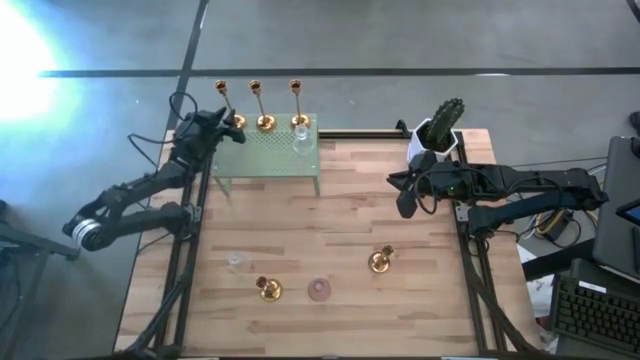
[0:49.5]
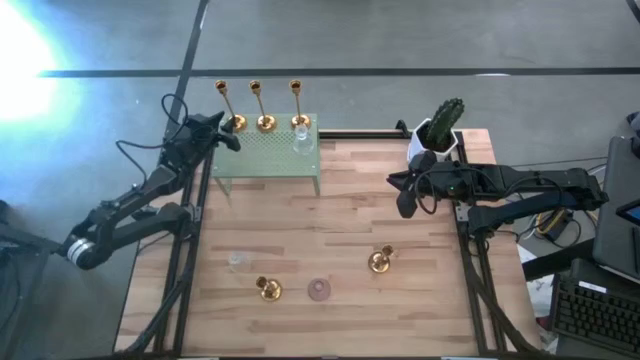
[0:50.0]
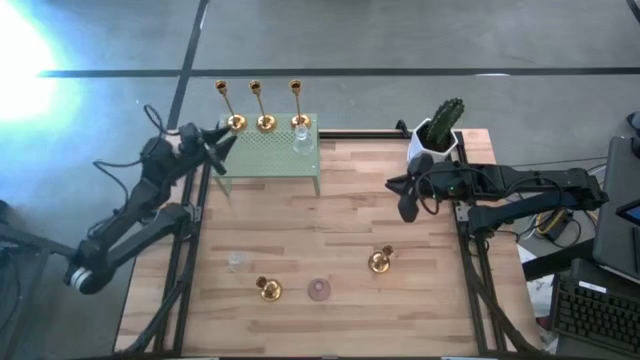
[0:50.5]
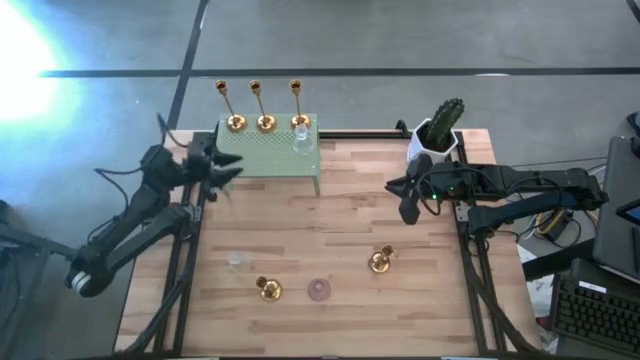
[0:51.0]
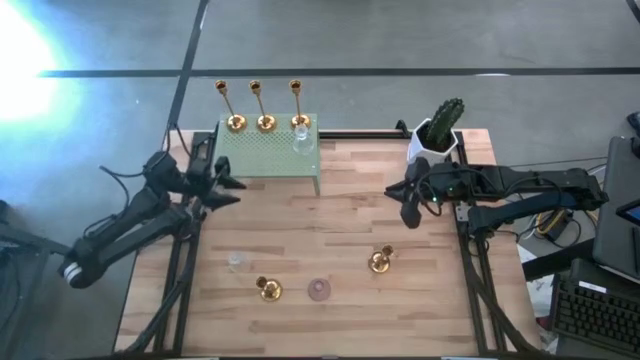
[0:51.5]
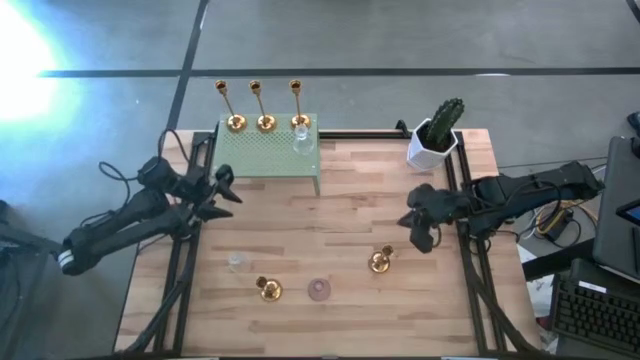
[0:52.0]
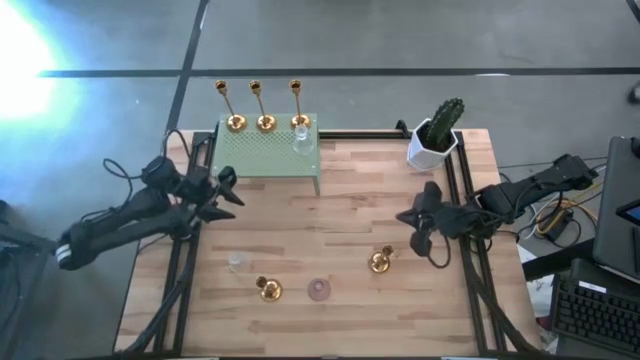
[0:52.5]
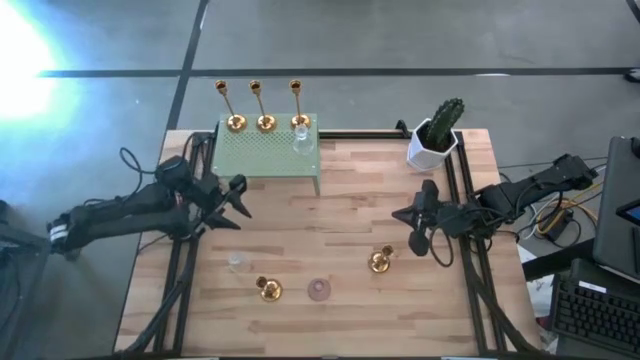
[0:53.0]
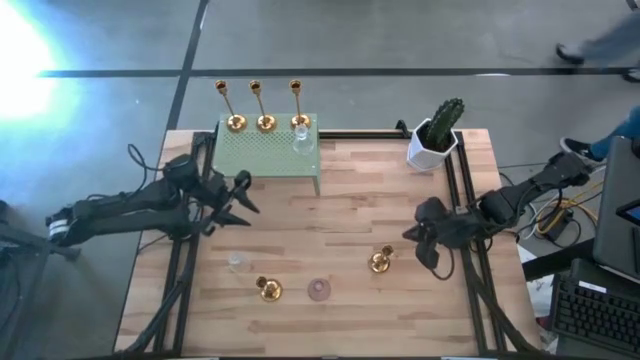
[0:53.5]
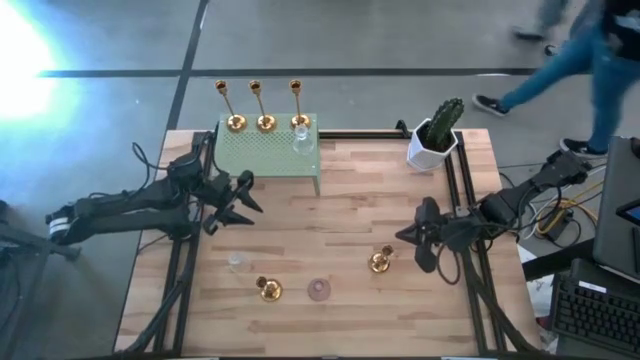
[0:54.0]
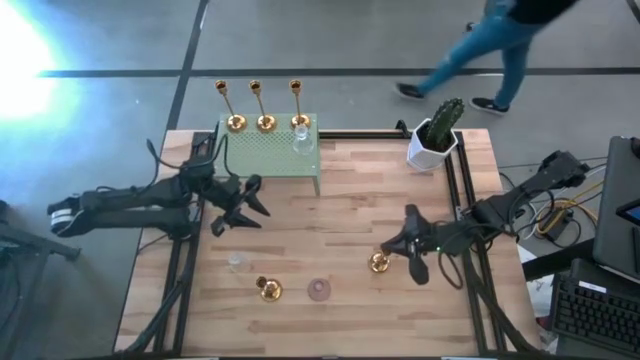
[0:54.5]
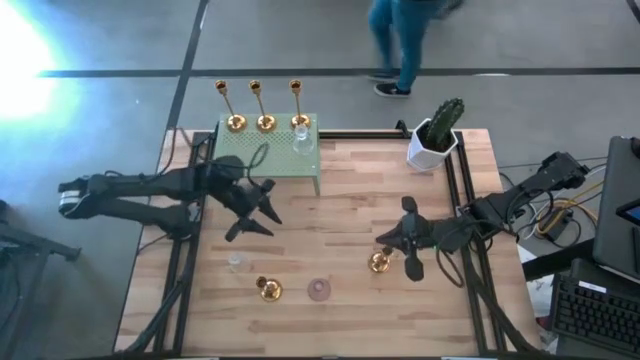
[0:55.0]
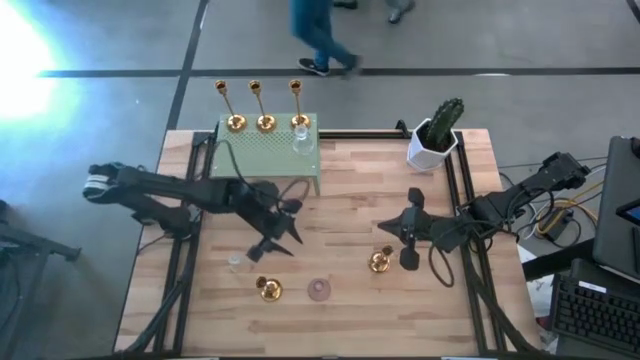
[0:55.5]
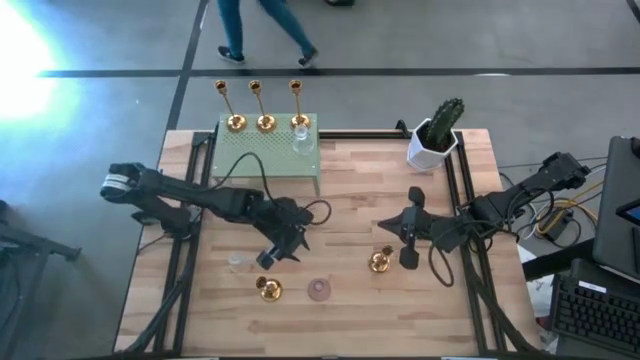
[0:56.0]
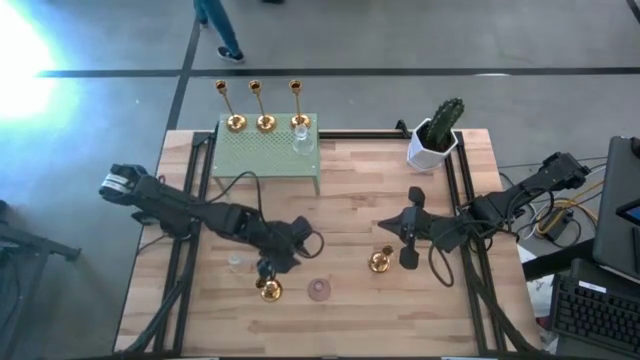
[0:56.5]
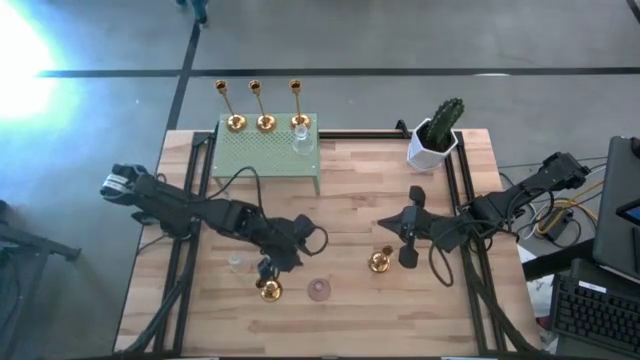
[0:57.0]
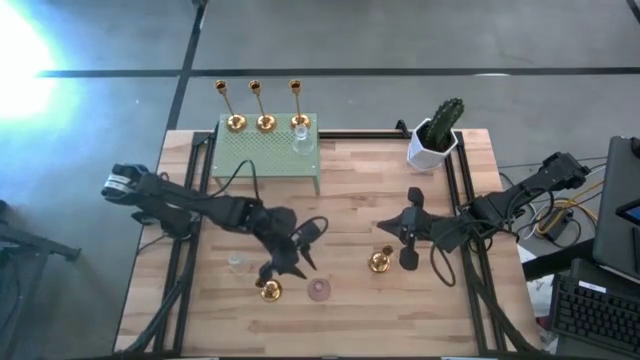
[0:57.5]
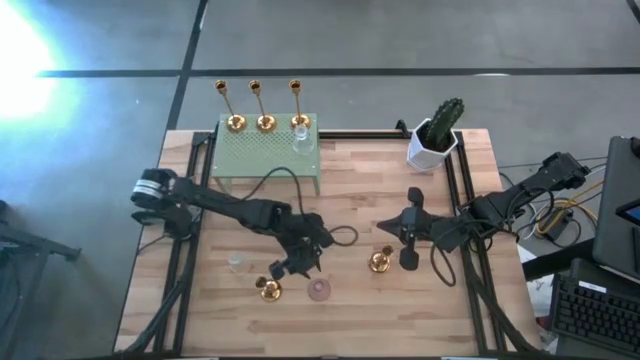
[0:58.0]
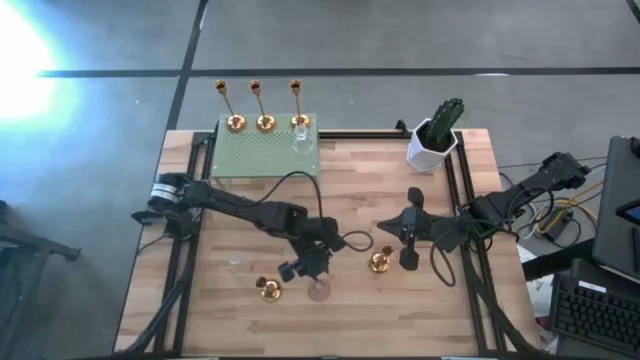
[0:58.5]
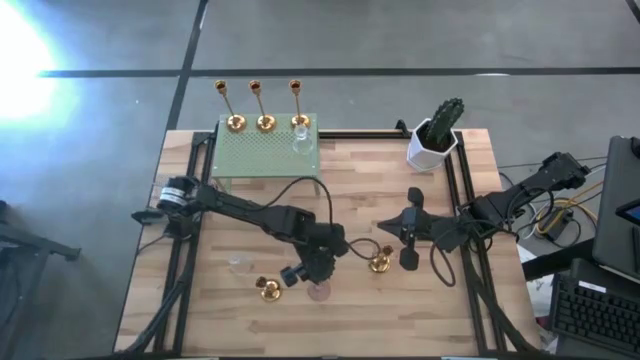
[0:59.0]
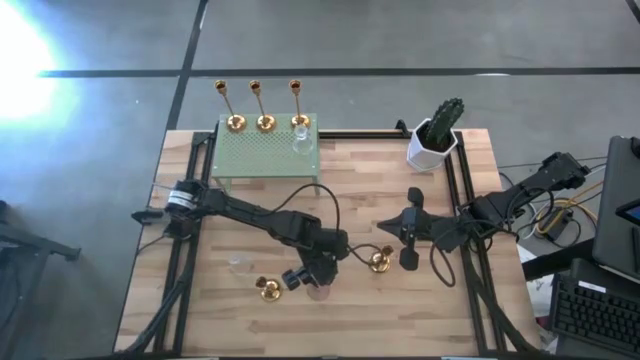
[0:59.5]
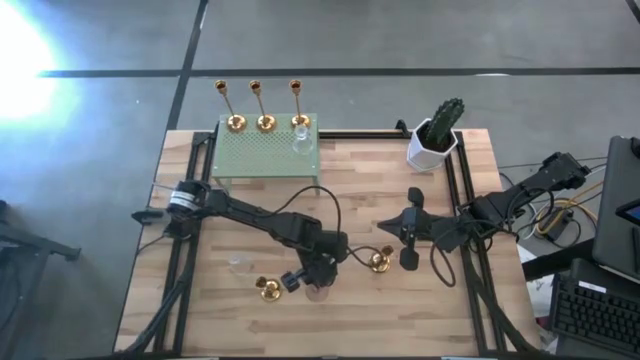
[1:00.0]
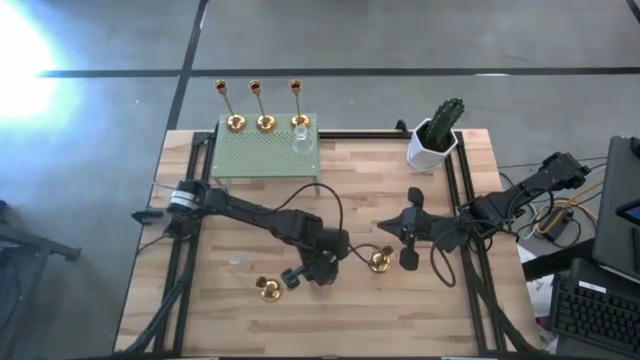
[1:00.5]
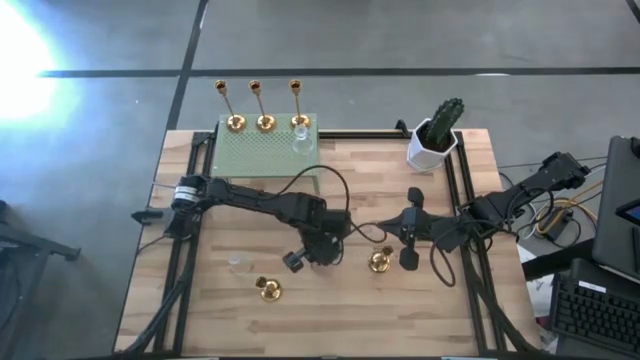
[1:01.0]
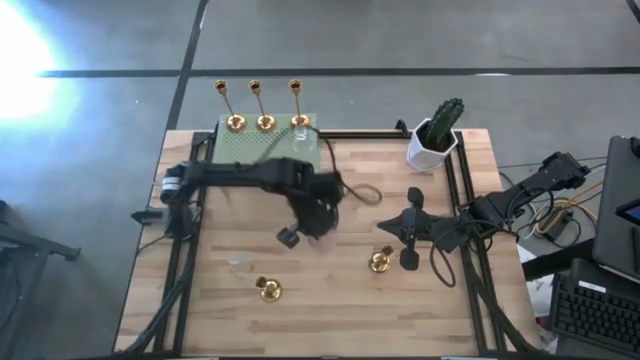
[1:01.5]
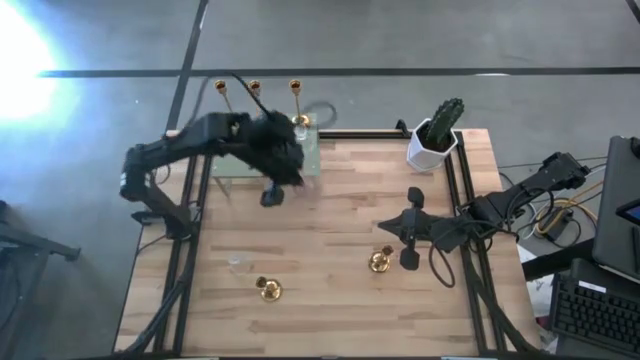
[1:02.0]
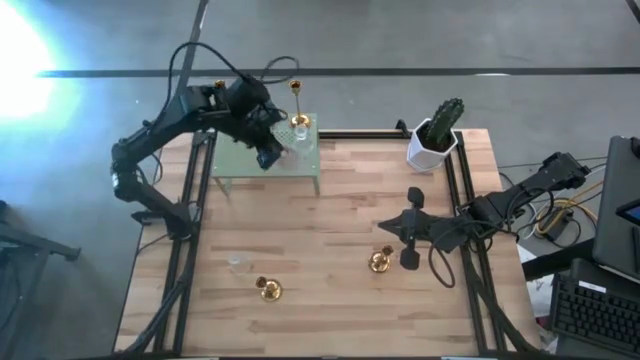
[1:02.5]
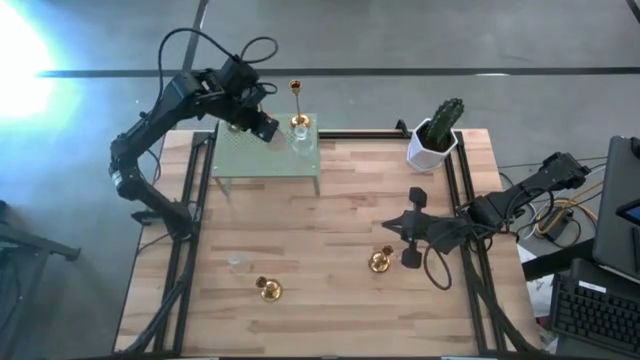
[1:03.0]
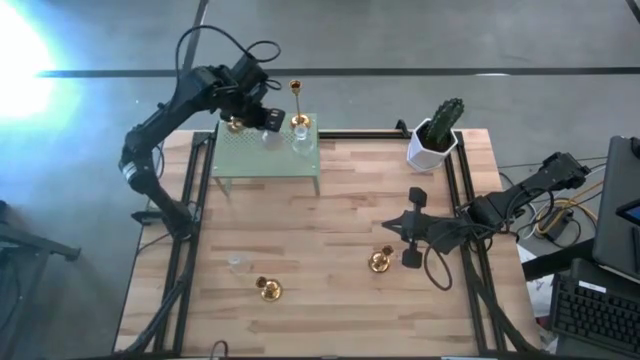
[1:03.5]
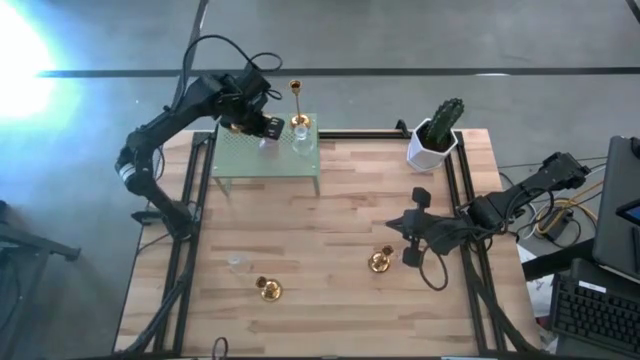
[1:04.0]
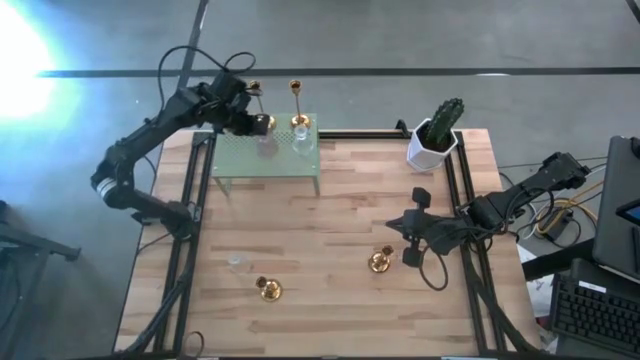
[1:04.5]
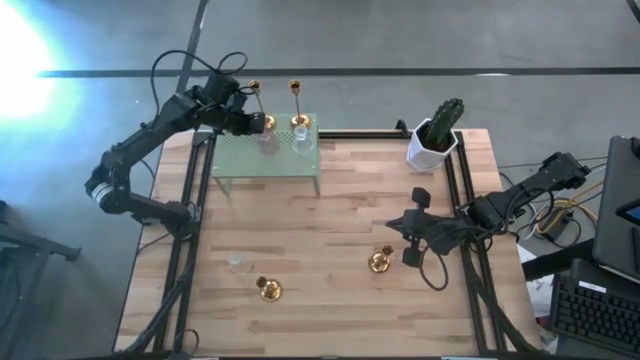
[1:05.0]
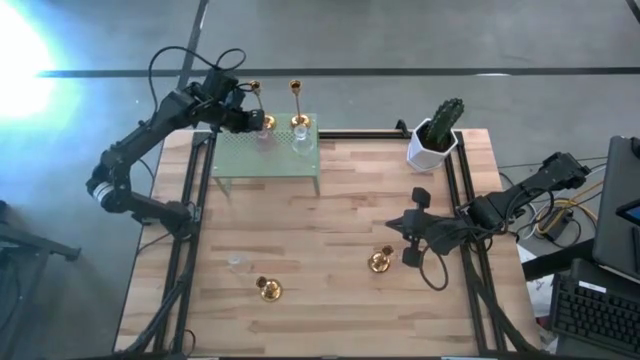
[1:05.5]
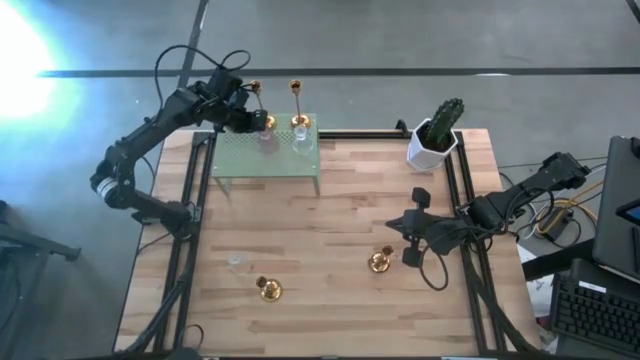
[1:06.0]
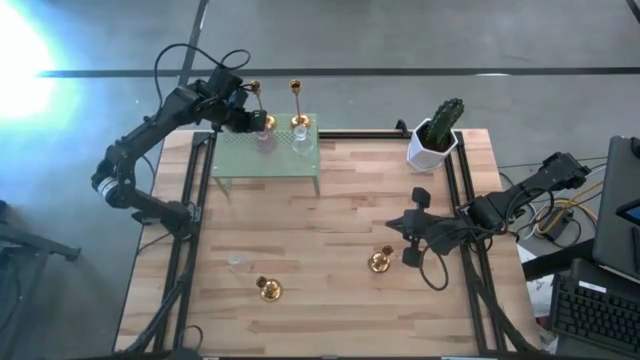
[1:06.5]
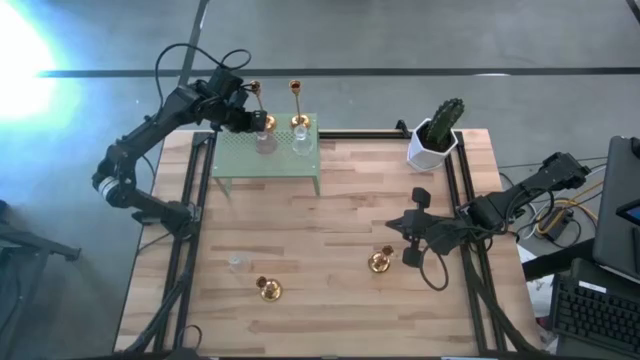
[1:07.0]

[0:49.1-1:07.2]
Task: Pick & Place candle stick holders
Put the pink candle holder on the shelf
